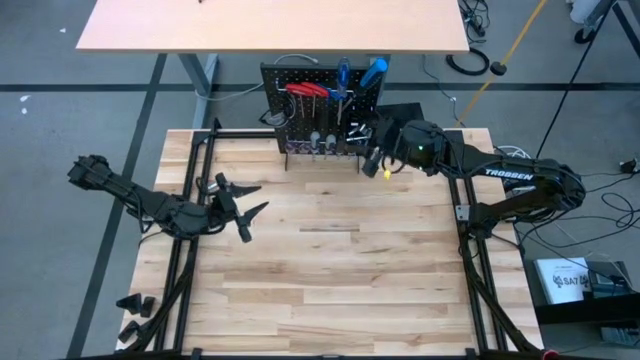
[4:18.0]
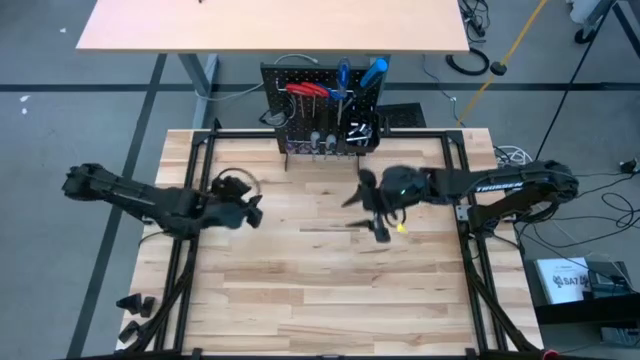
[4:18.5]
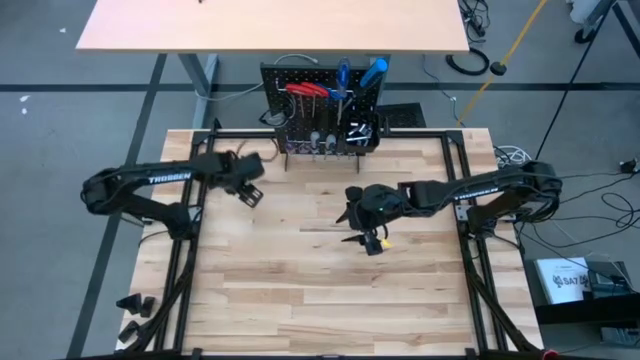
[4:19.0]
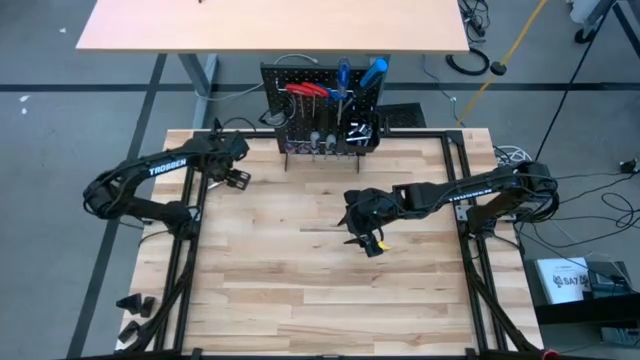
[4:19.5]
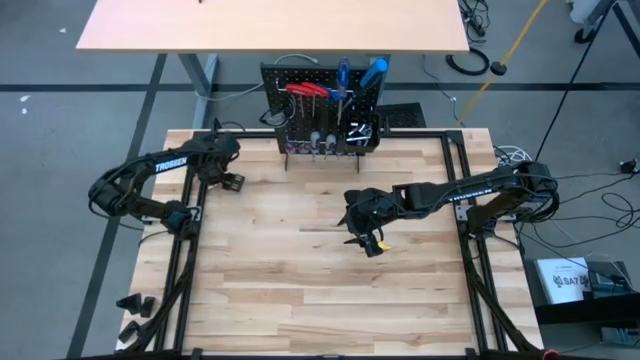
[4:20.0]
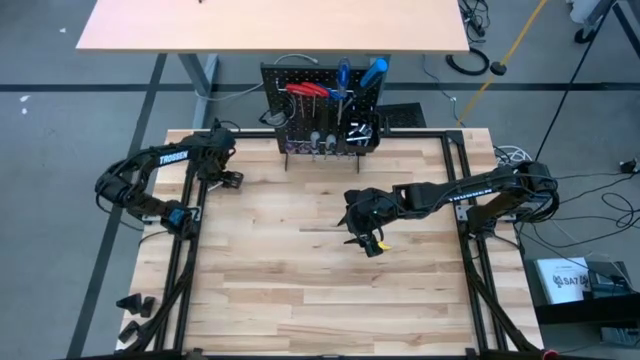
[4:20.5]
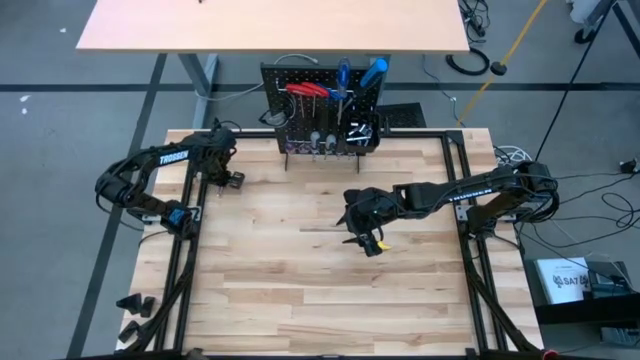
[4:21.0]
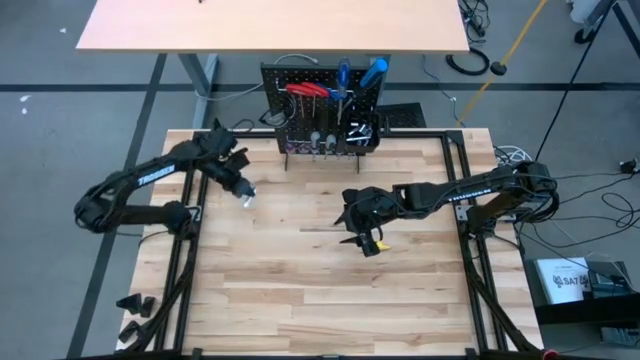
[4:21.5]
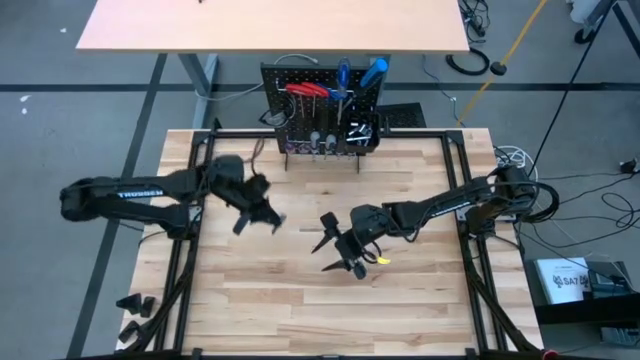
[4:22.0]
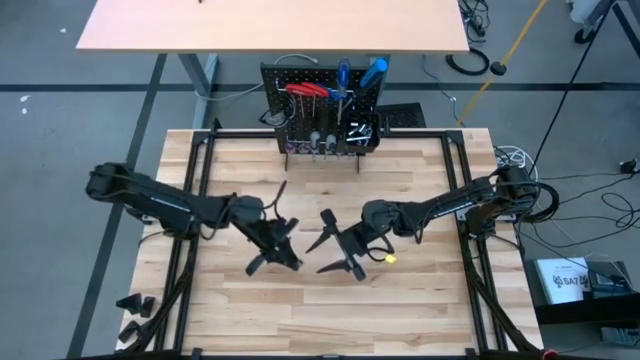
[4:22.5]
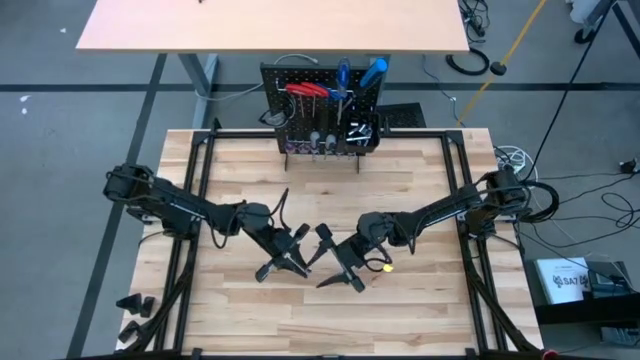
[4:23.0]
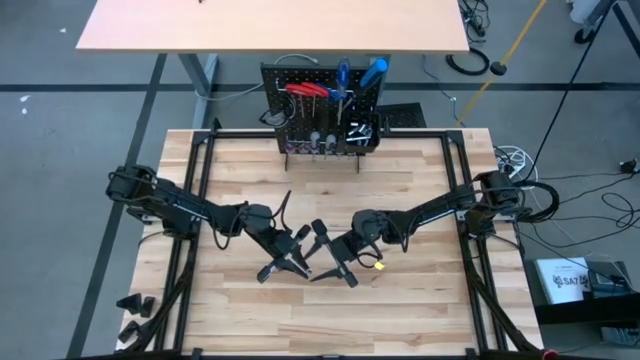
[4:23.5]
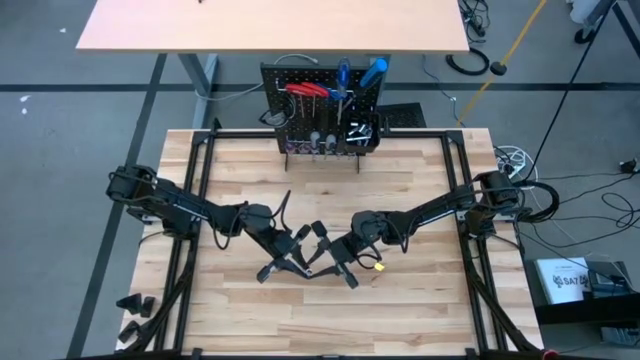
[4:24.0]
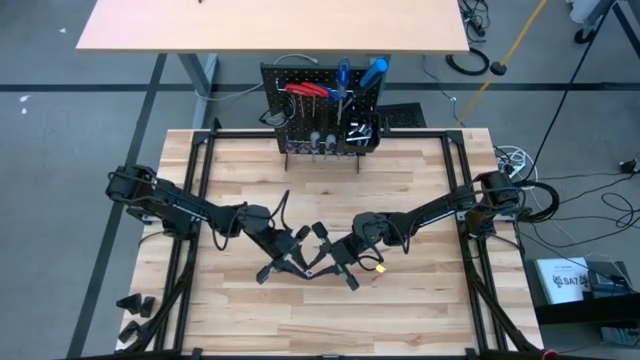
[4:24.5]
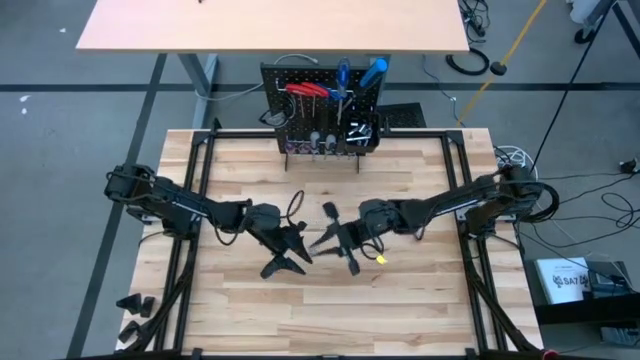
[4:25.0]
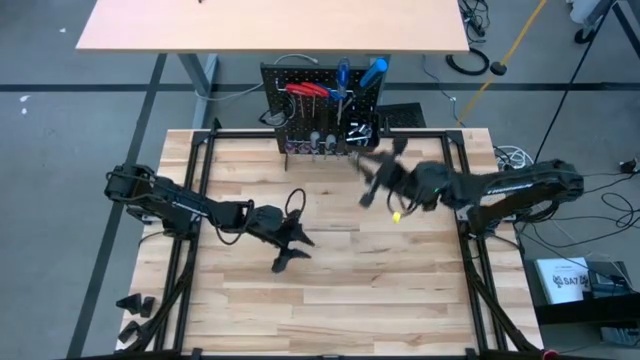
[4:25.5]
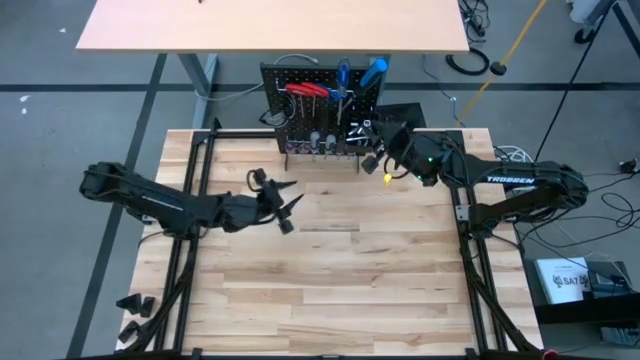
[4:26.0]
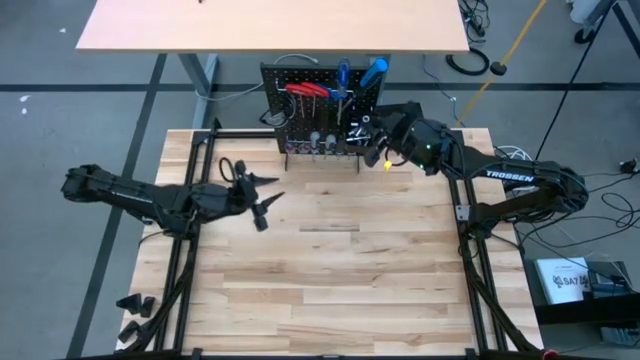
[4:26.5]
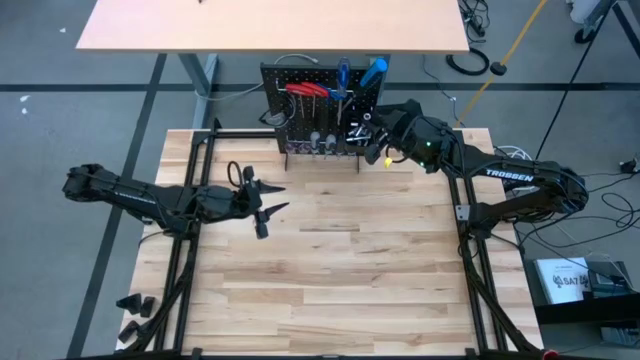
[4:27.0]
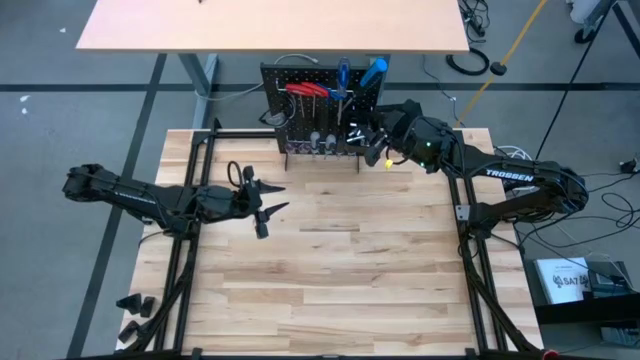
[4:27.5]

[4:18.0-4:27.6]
Task: Hang tools onto peg board
Put the extension bar into the black bin on the peg board

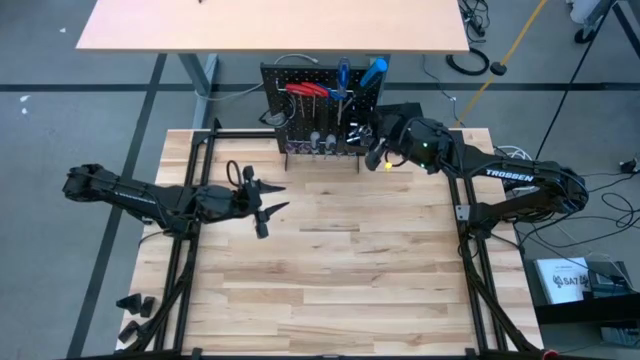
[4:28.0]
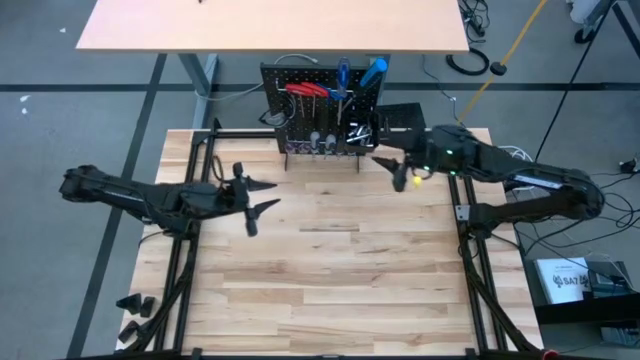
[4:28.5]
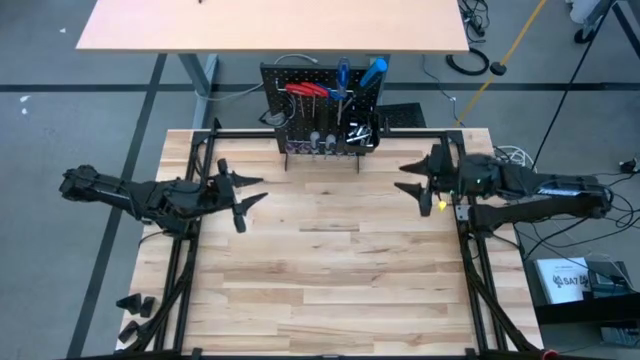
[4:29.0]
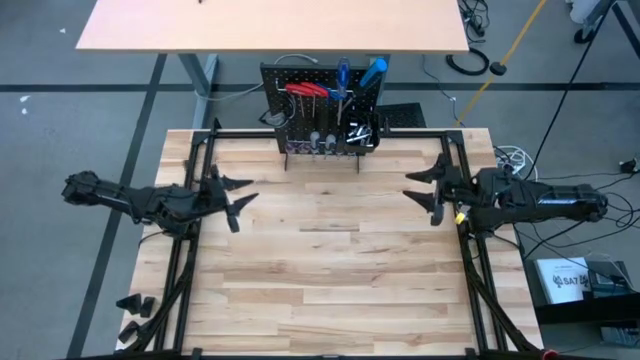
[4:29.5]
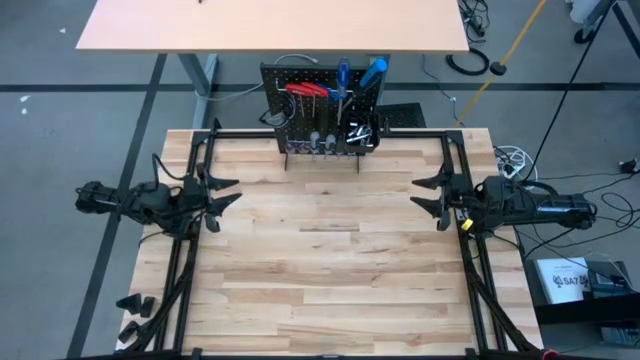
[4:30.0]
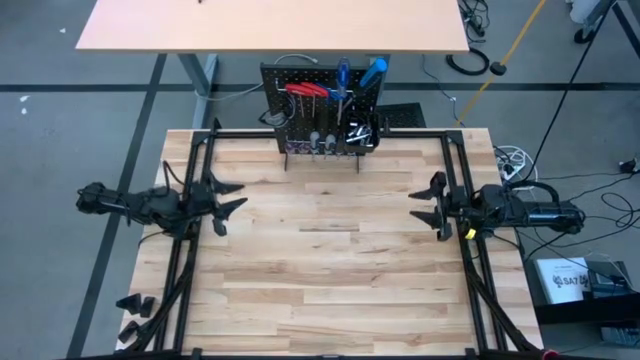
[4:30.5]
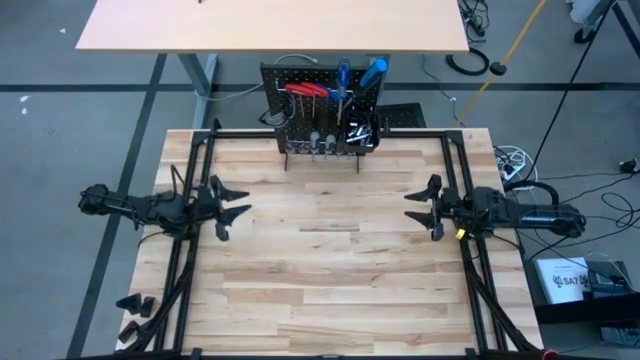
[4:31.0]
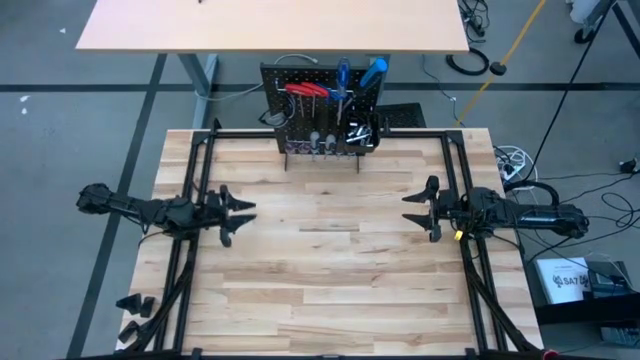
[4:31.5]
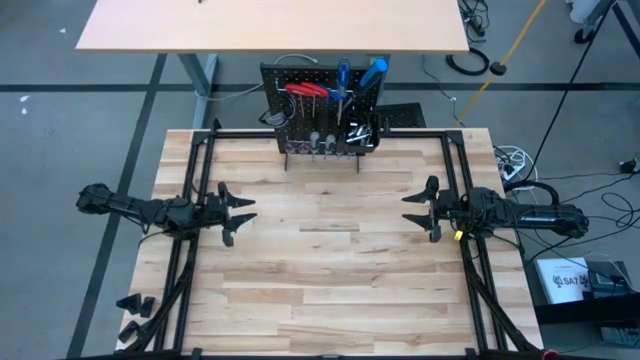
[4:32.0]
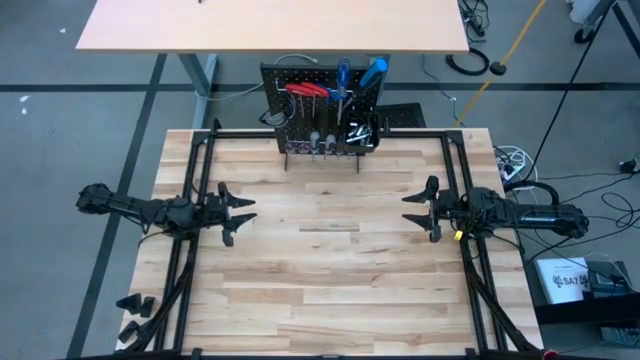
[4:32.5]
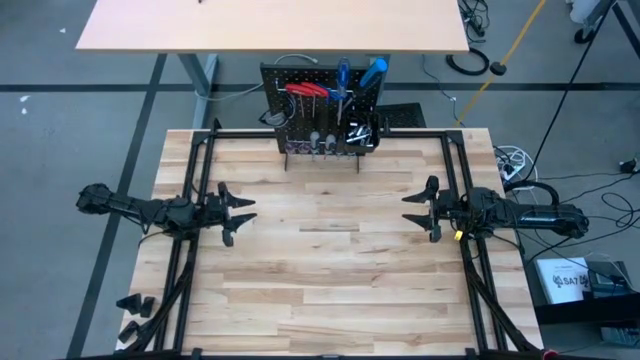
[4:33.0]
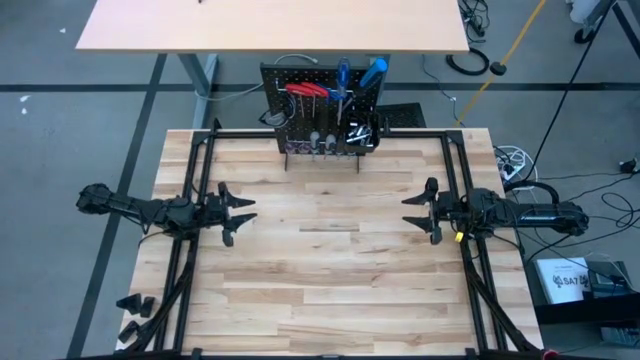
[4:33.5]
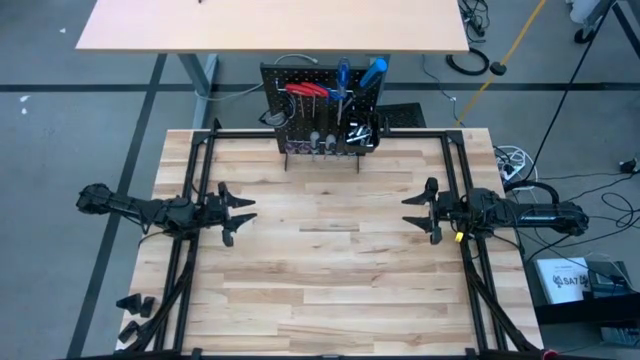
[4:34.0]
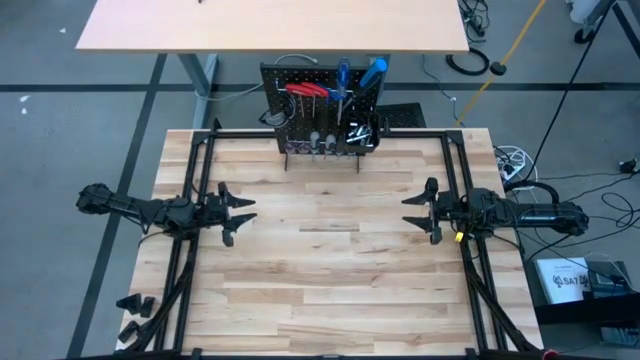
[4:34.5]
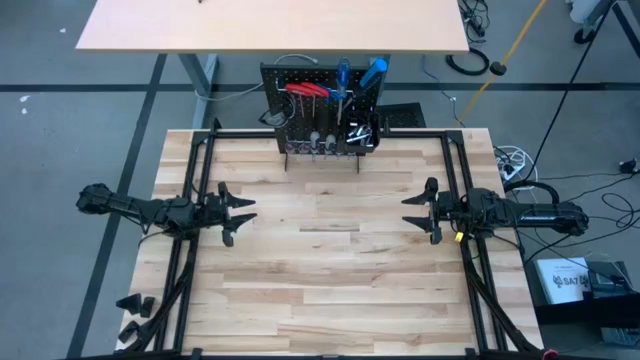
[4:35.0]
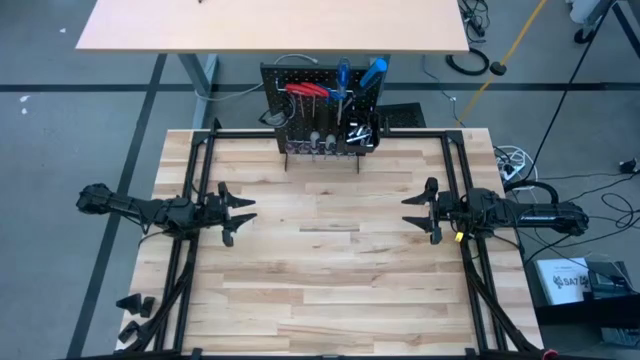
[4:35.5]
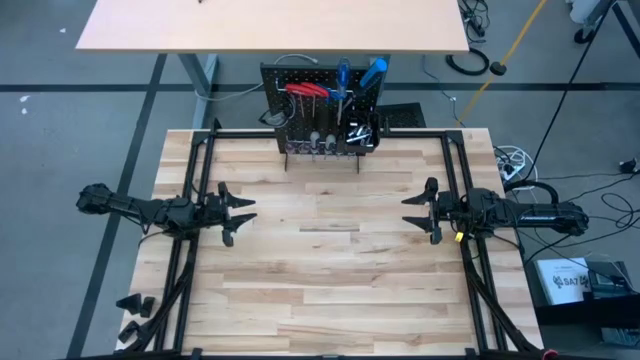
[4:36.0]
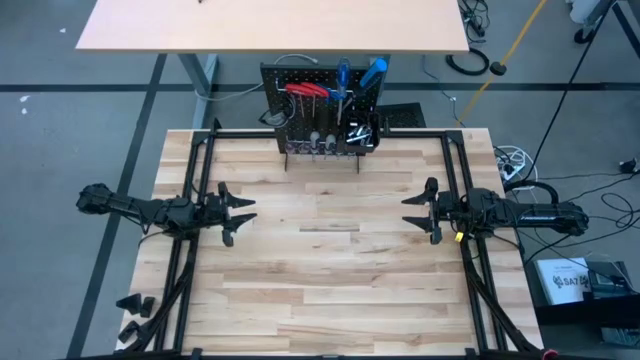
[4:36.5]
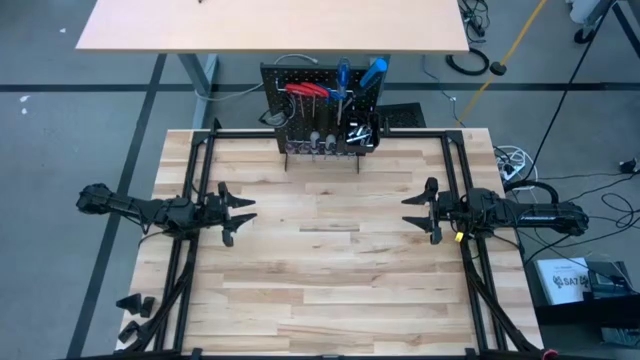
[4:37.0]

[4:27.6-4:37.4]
Return to Home Position

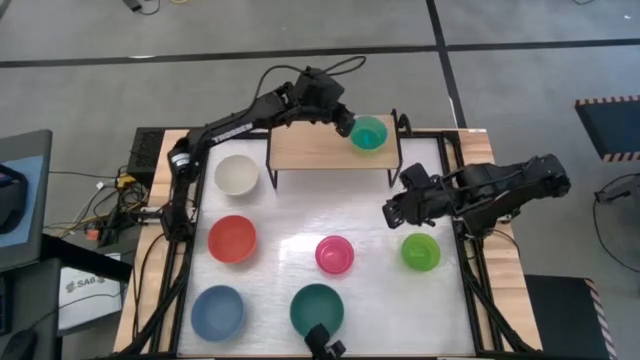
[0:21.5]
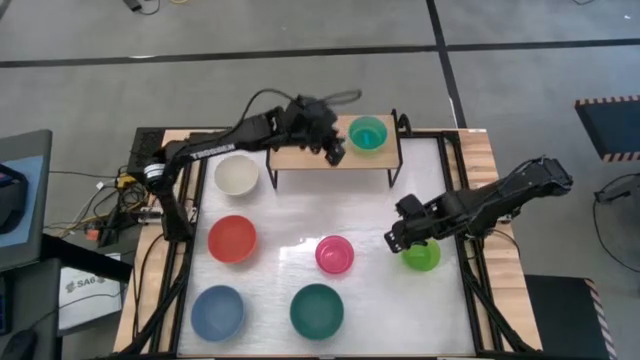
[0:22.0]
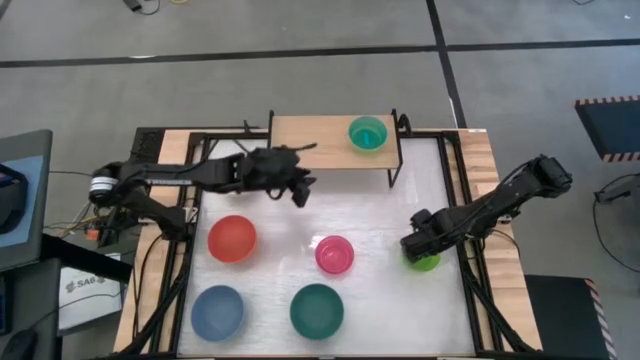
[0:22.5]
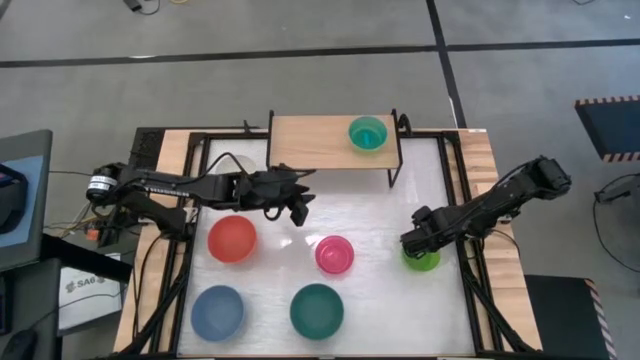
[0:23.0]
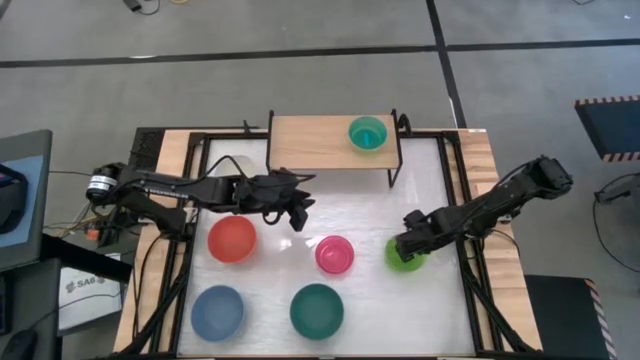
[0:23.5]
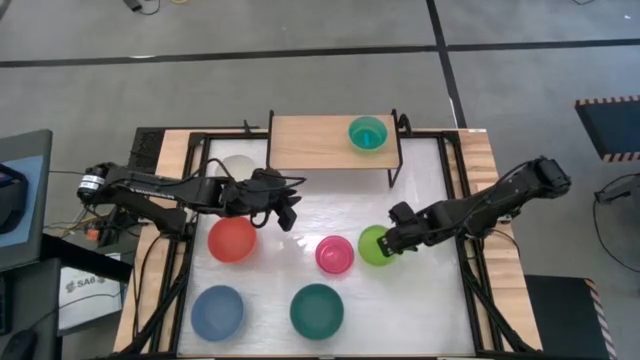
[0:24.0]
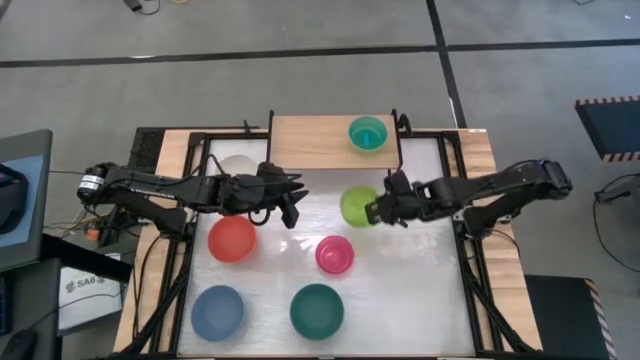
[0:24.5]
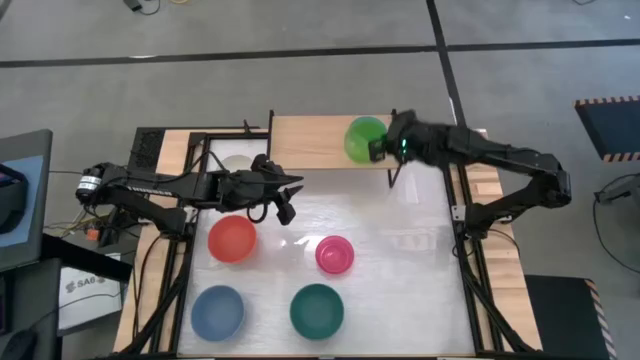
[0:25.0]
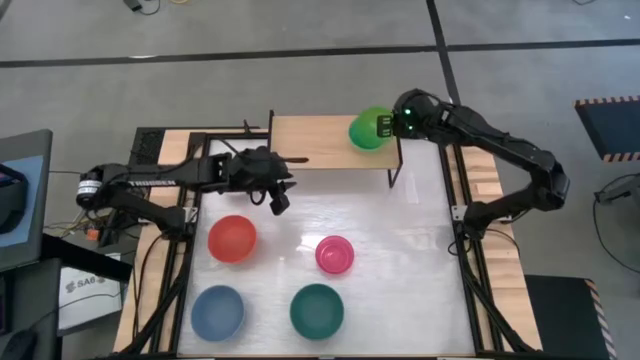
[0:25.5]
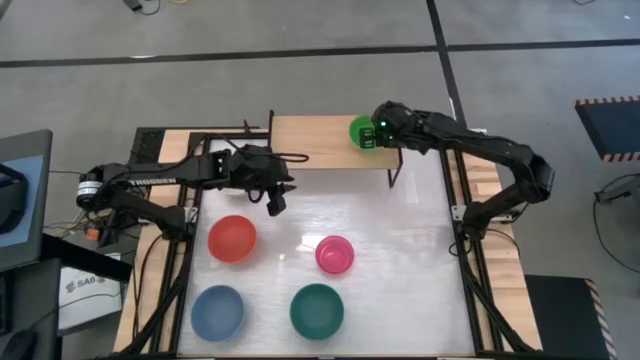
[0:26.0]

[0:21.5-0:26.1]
Task: Place and stack bowls onto a shelf
Stack the green bowl on top of the light blue bowl on the shelf
